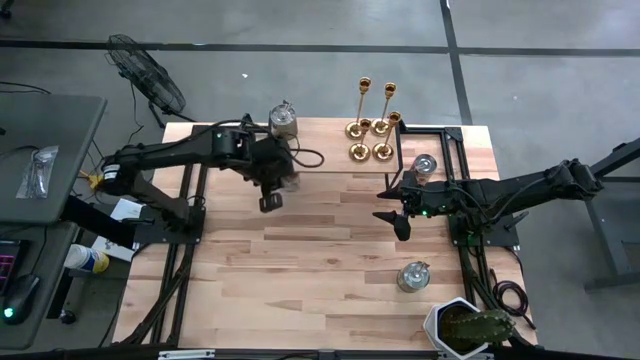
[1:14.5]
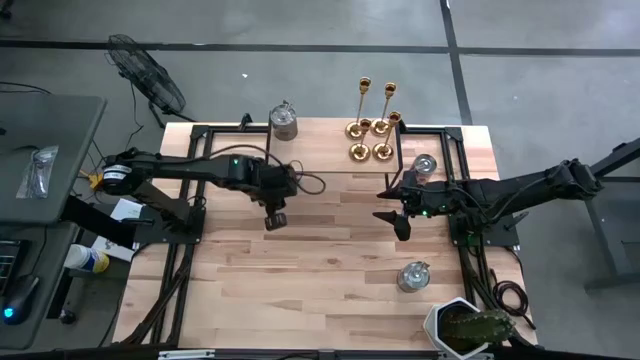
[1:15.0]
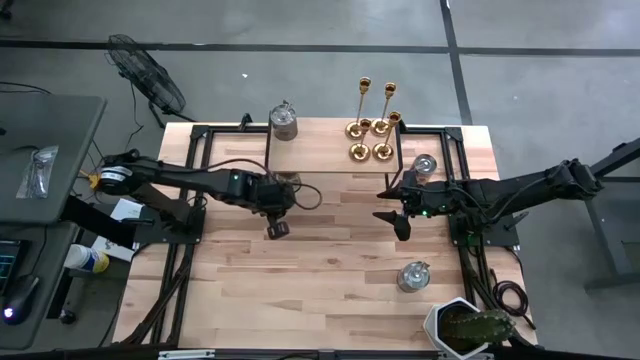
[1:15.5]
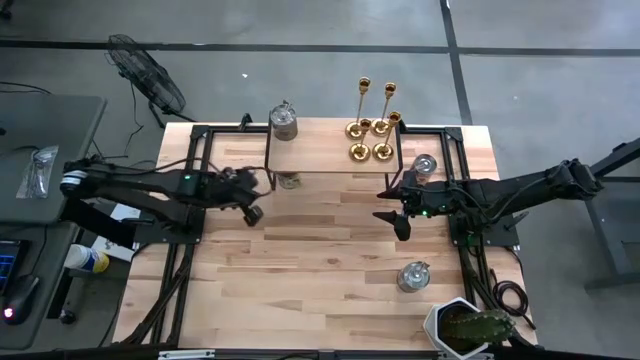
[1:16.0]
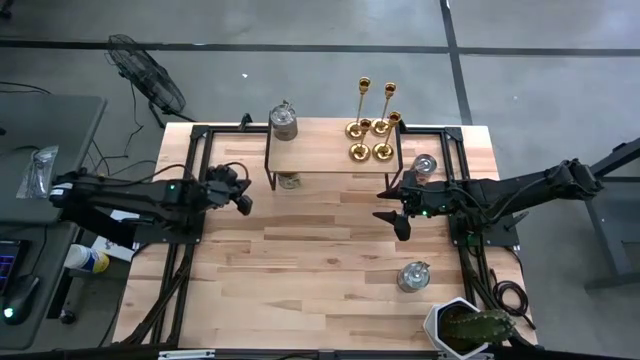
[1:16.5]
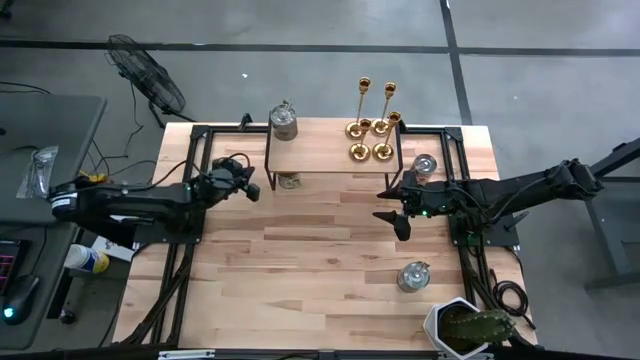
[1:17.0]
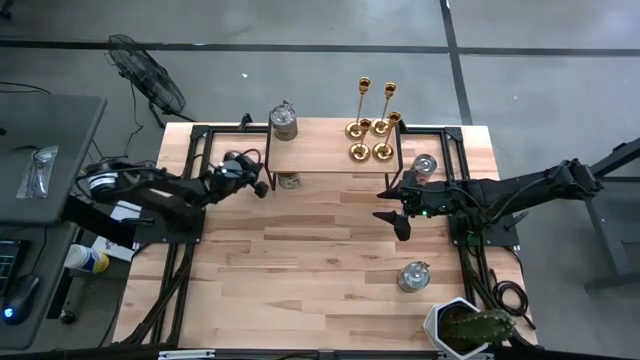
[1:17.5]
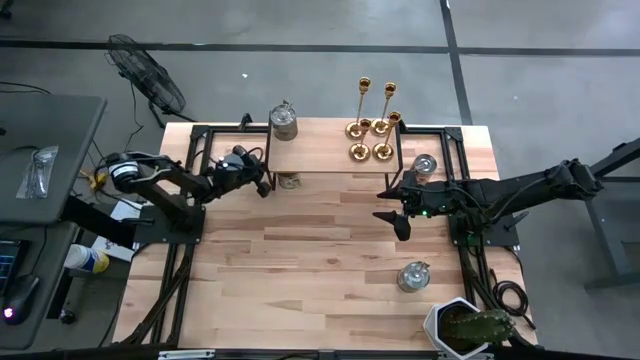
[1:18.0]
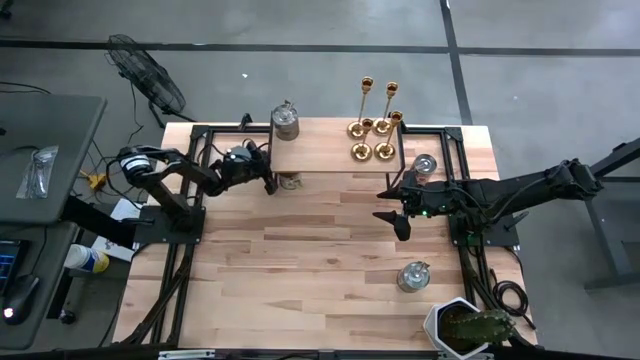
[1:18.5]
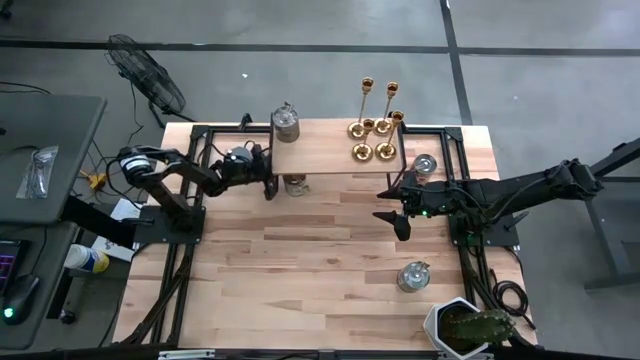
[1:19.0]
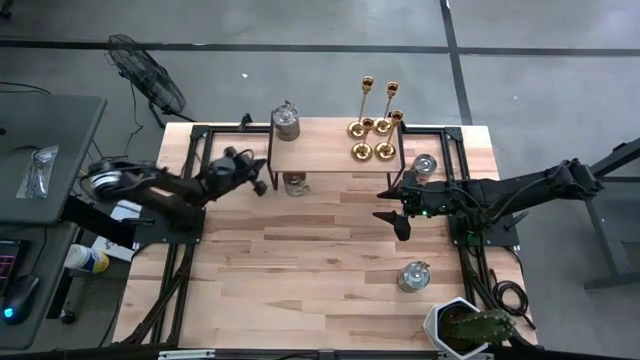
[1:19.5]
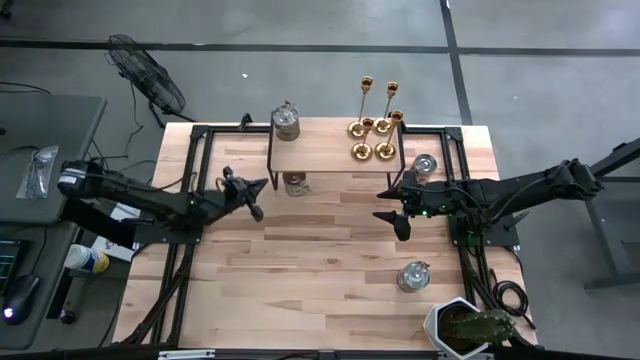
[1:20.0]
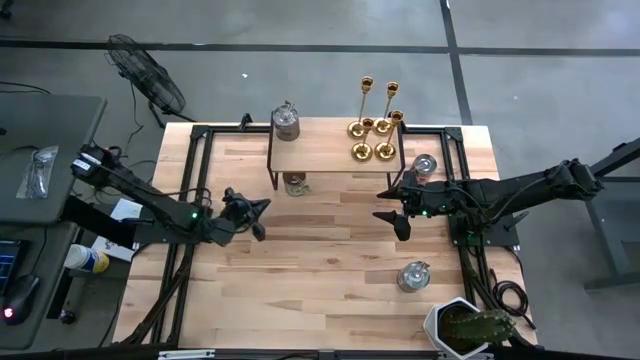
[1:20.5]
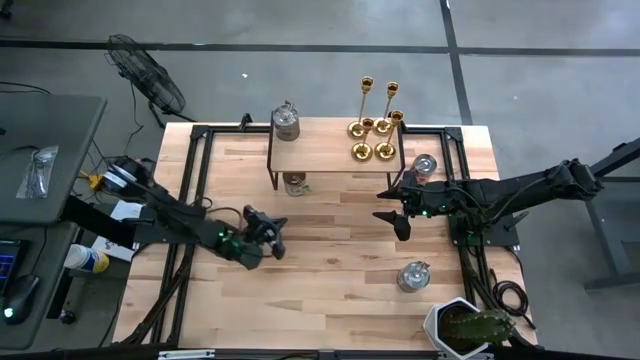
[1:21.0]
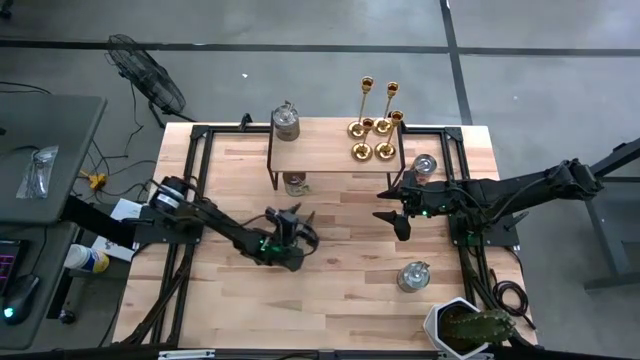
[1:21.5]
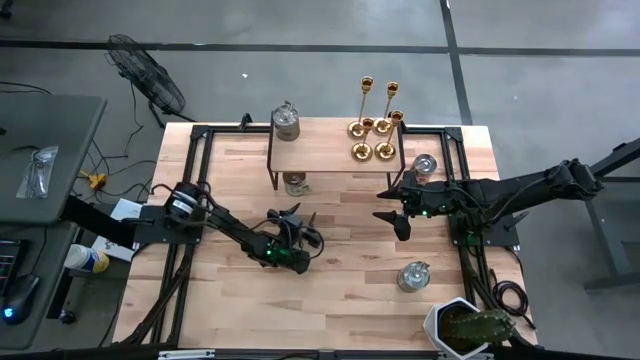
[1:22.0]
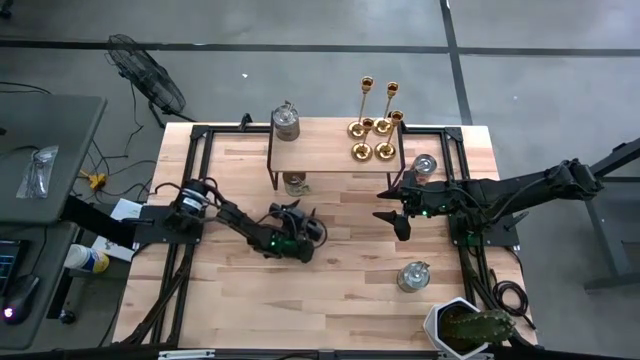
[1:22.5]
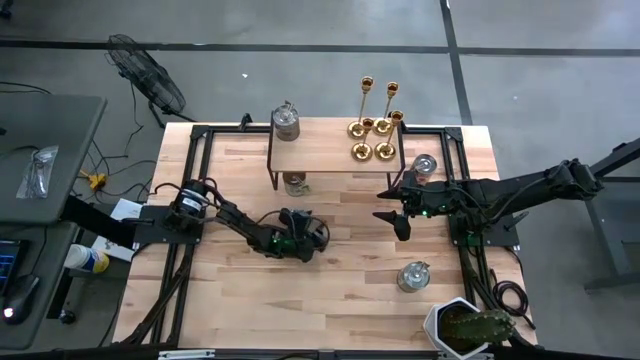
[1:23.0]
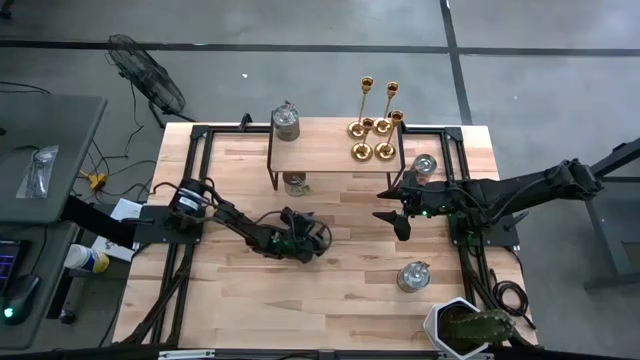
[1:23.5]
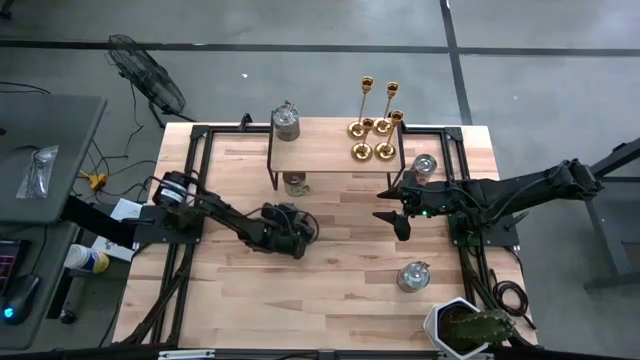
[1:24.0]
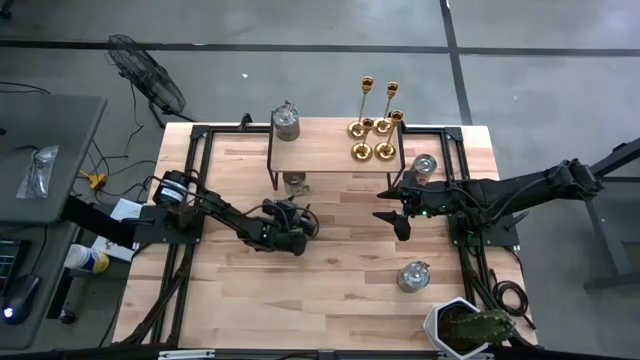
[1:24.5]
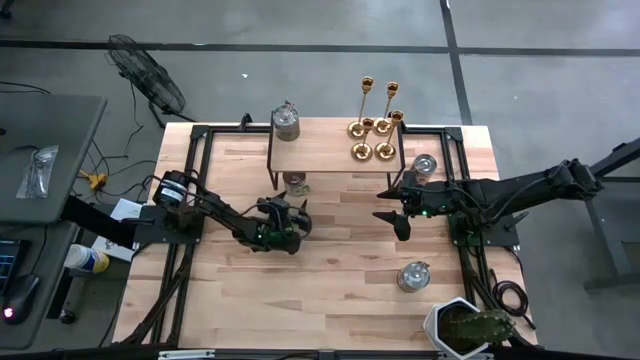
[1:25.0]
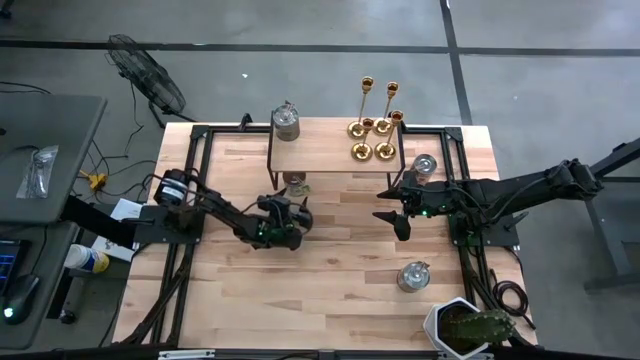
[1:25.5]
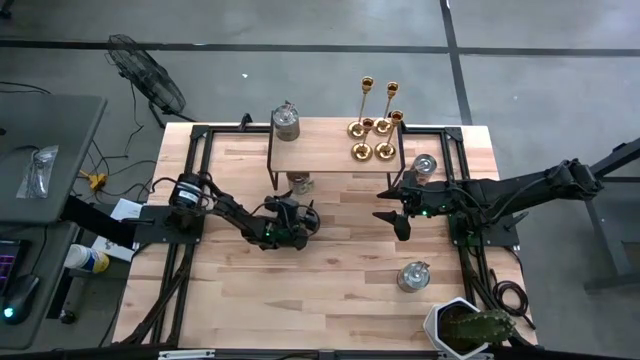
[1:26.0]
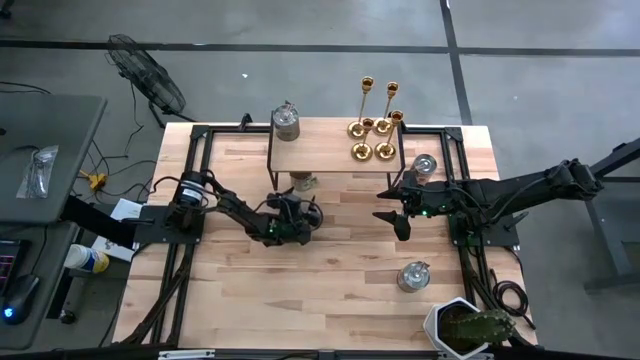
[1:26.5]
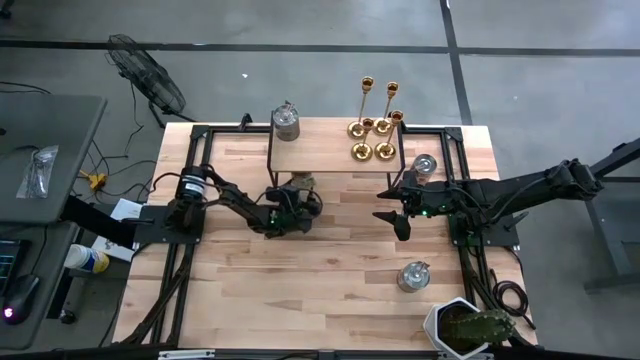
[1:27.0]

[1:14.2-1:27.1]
Task: Pick & Place candle stick holders
Put the silver scented candle on the shelf

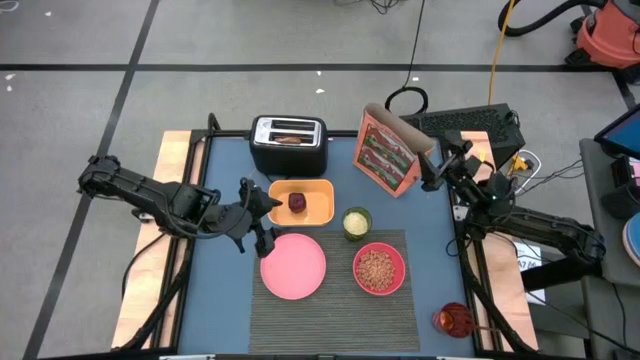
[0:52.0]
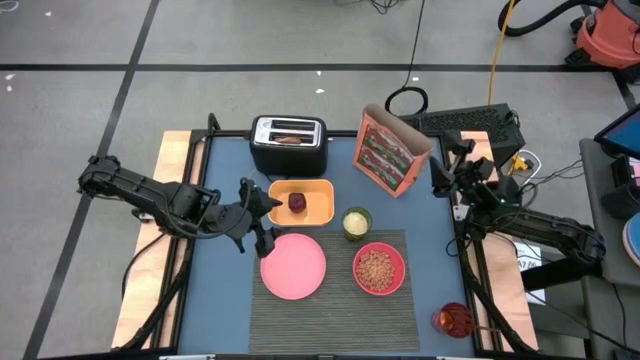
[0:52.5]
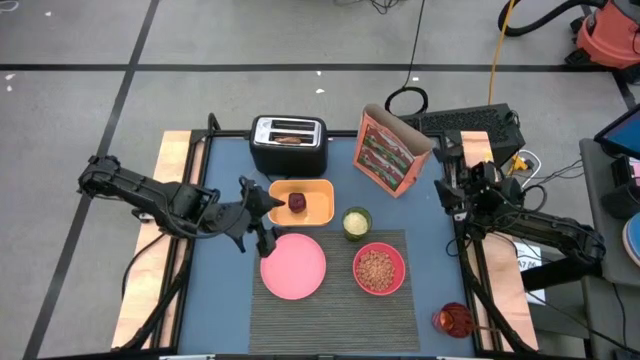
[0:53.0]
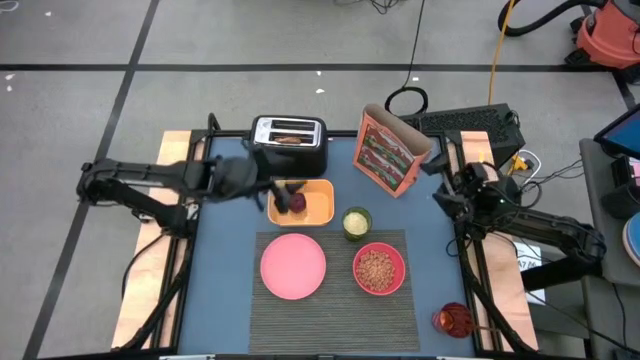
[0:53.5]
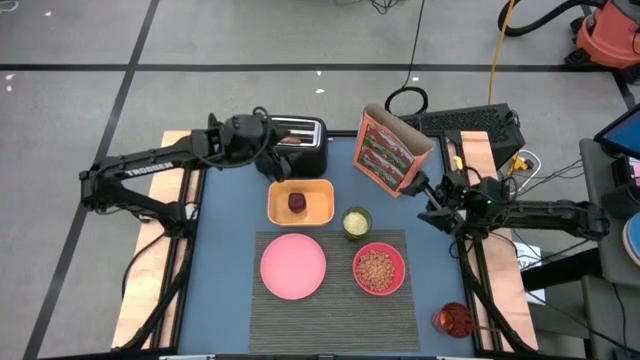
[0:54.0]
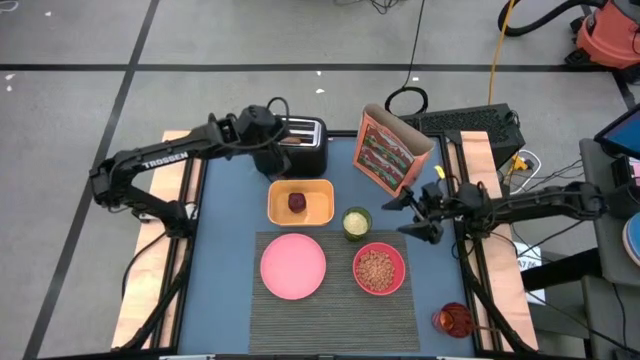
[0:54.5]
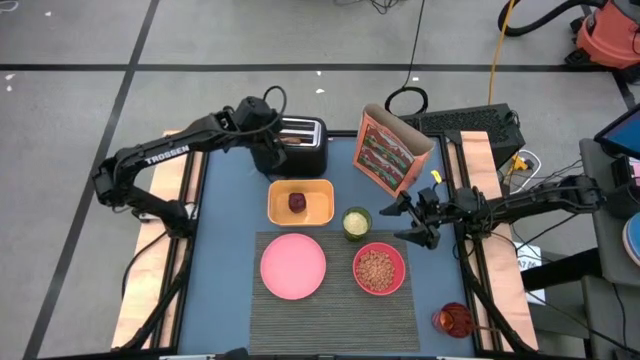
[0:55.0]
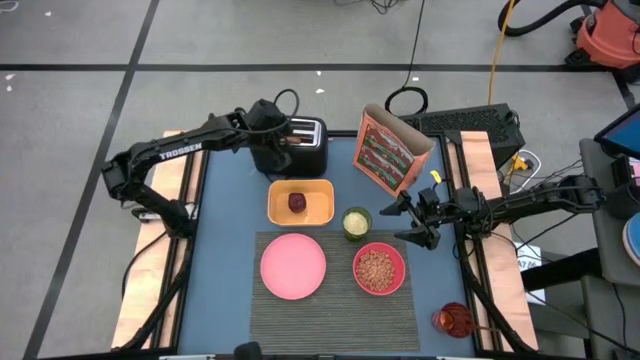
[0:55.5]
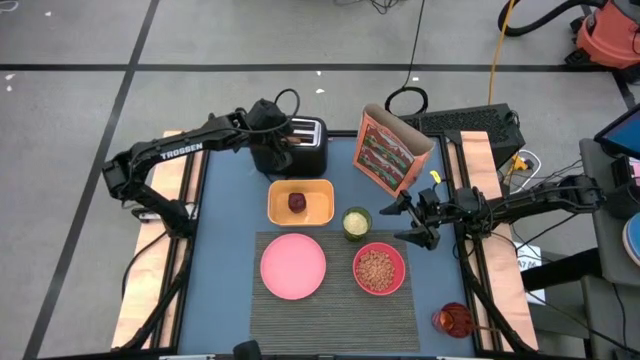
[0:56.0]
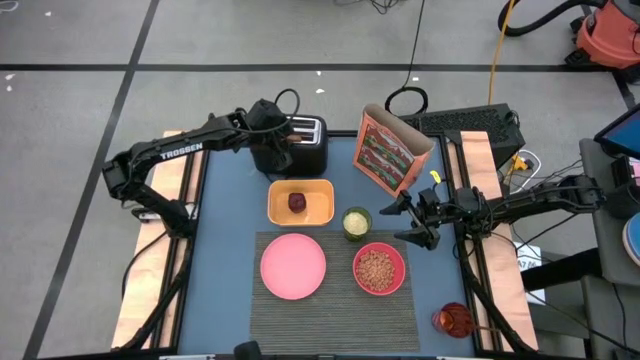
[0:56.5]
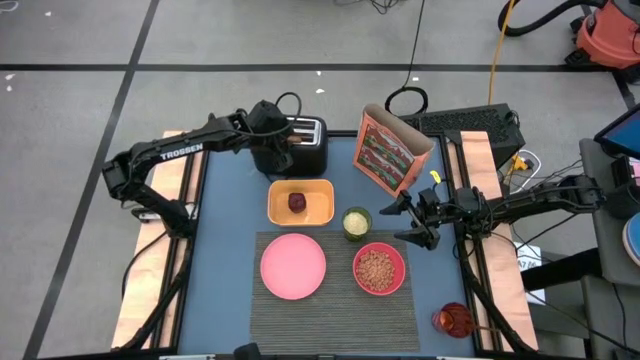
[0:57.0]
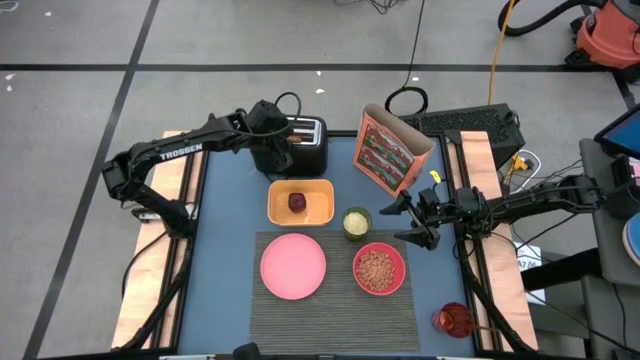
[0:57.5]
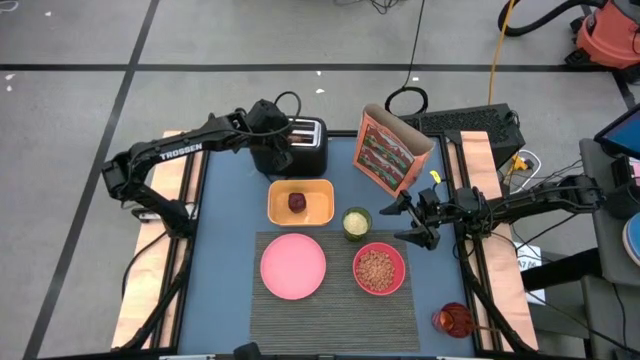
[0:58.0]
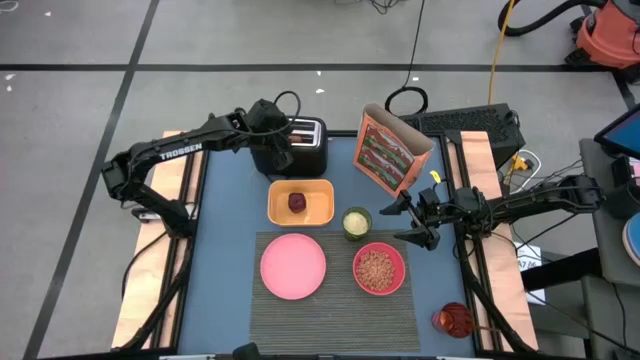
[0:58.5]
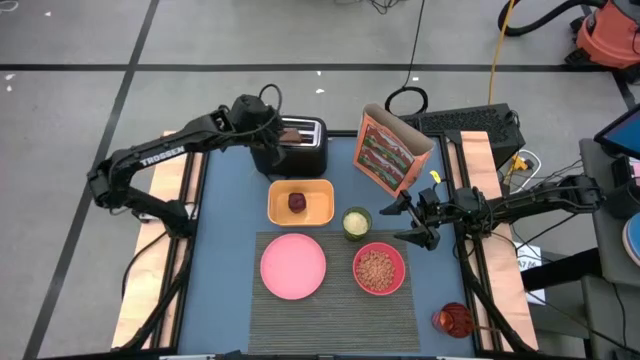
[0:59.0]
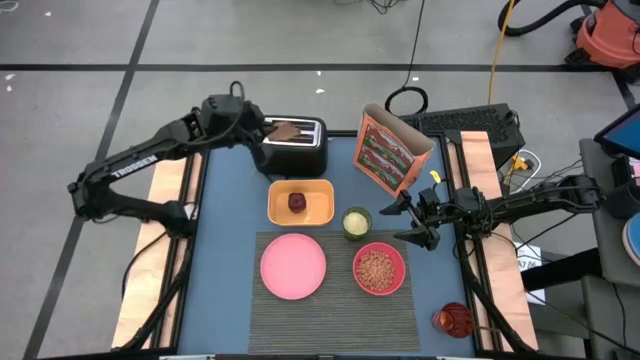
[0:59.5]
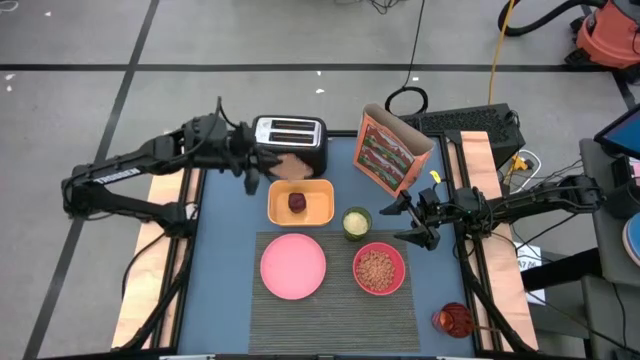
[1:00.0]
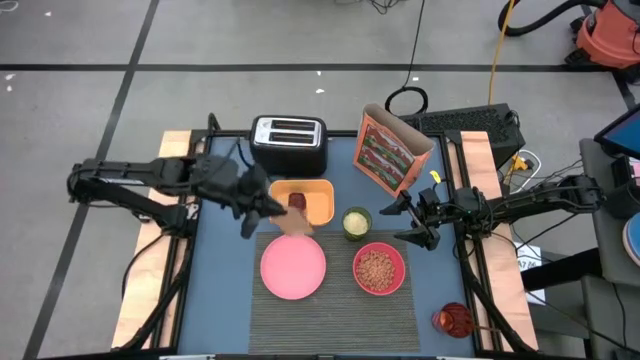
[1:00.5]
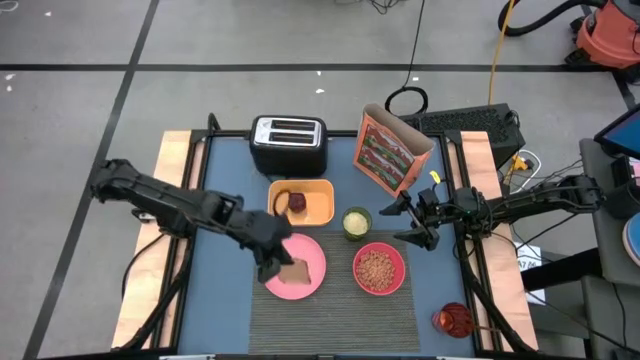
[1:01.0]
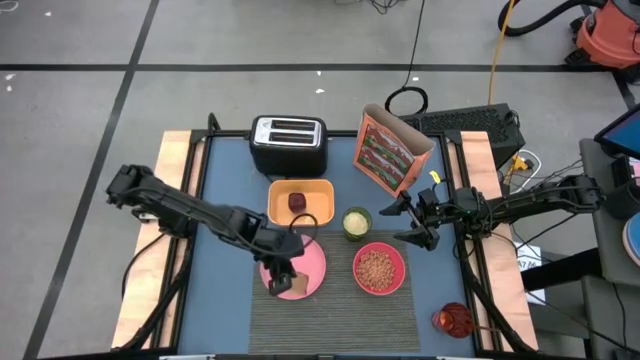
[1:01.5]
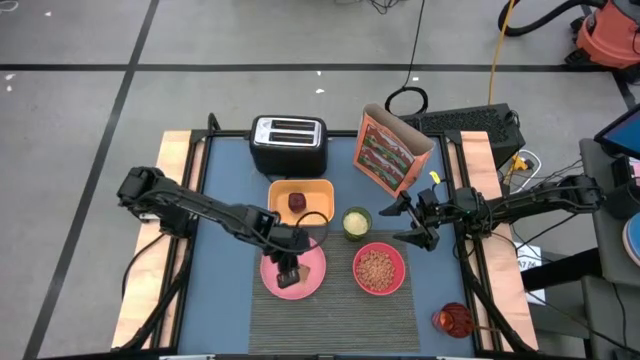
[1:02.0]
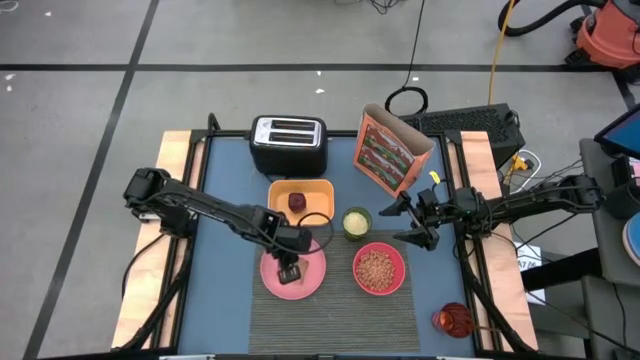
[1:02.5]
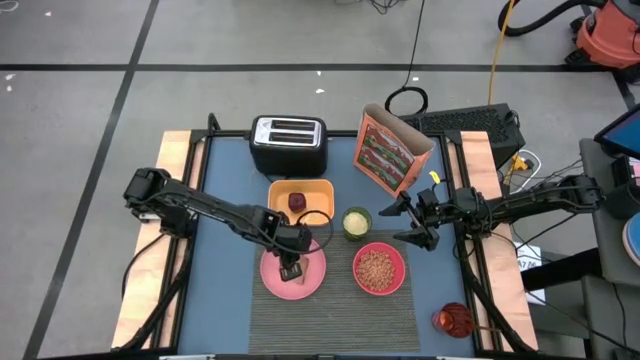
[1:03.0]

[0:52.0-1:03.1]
Task: Arrange a breakfast setting
Put the toasted bread from the toaster on the light pink plate
